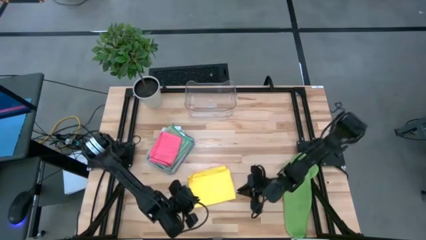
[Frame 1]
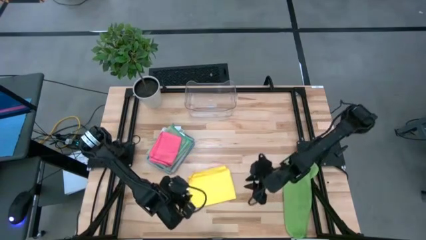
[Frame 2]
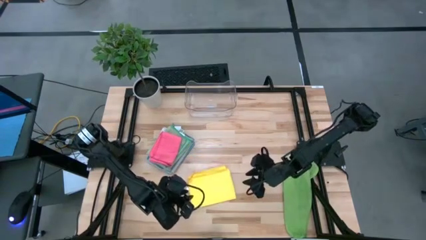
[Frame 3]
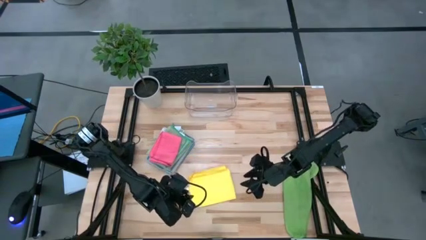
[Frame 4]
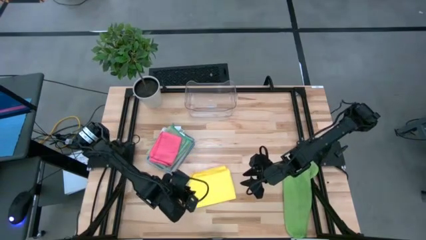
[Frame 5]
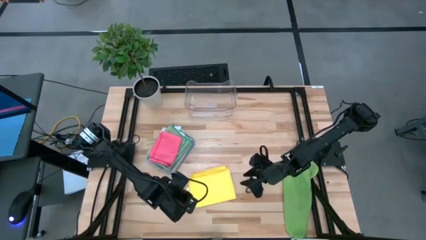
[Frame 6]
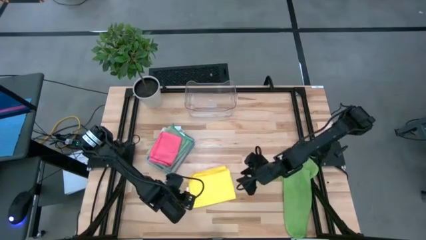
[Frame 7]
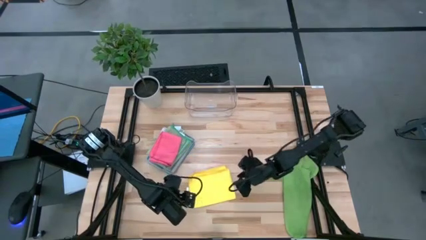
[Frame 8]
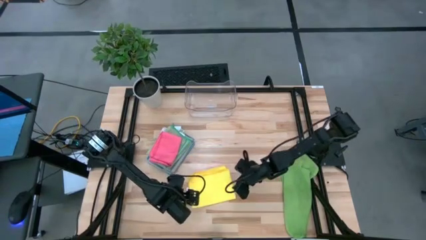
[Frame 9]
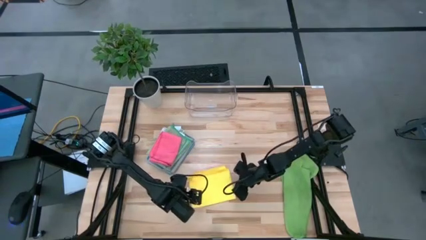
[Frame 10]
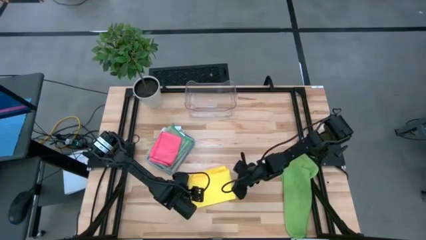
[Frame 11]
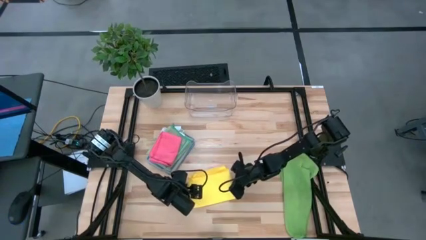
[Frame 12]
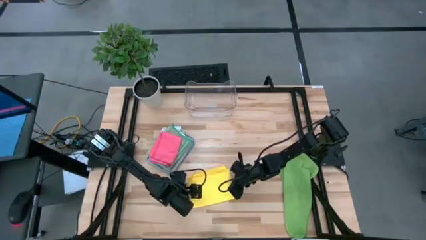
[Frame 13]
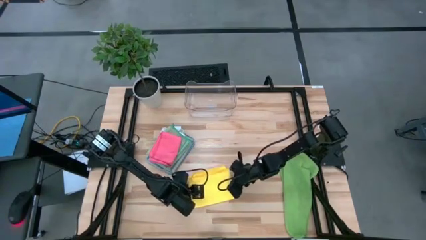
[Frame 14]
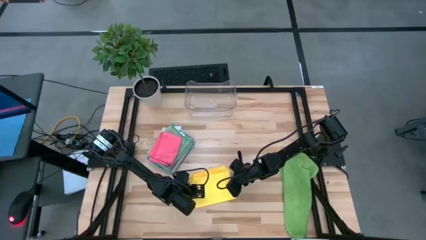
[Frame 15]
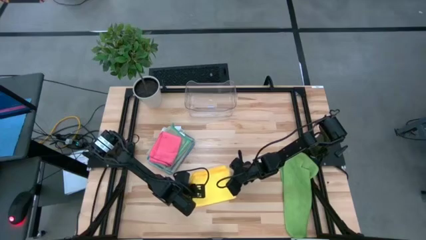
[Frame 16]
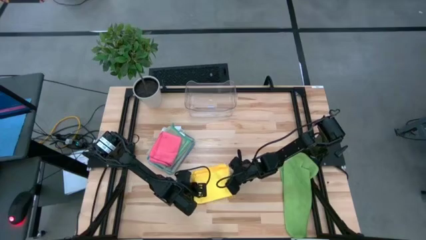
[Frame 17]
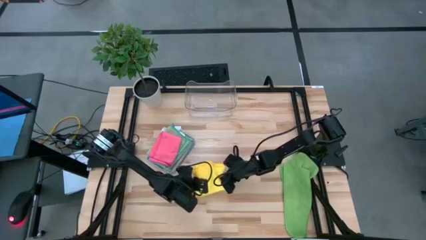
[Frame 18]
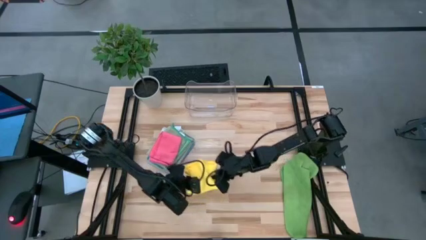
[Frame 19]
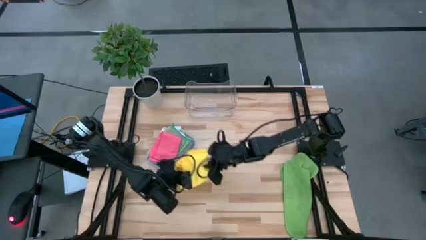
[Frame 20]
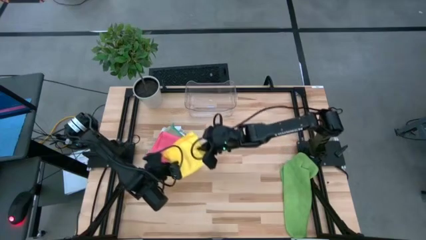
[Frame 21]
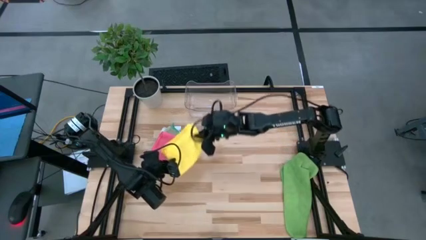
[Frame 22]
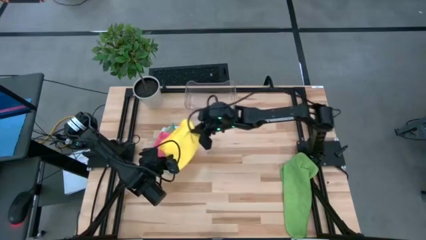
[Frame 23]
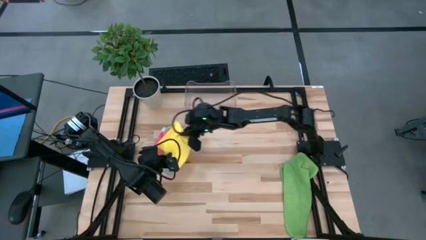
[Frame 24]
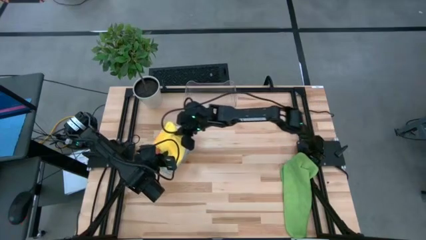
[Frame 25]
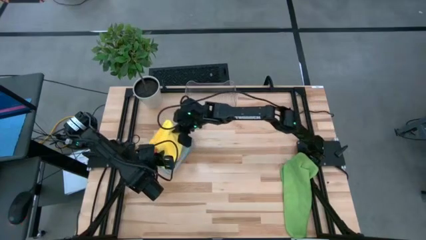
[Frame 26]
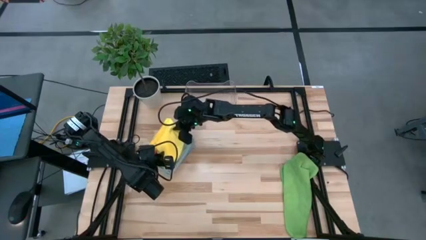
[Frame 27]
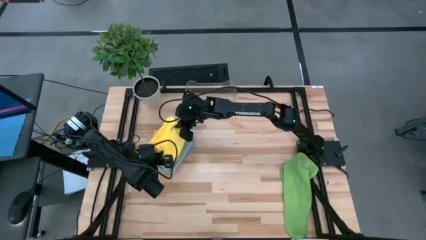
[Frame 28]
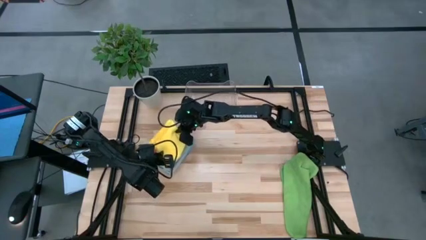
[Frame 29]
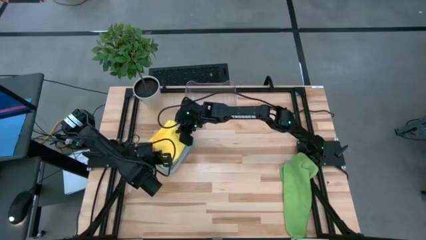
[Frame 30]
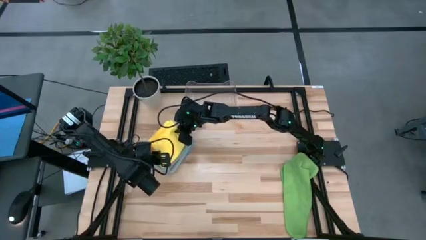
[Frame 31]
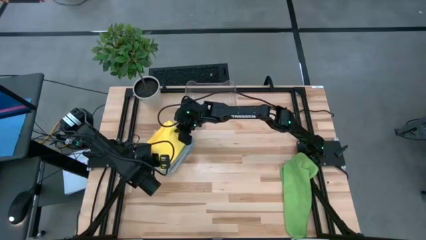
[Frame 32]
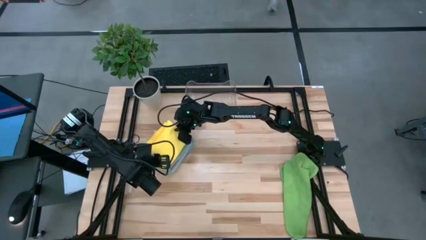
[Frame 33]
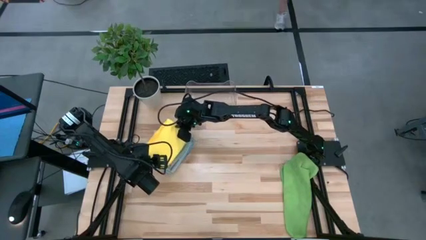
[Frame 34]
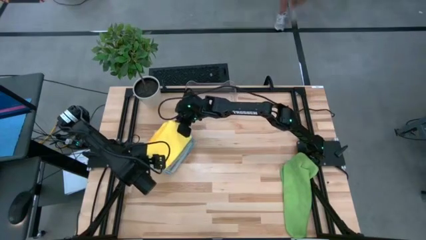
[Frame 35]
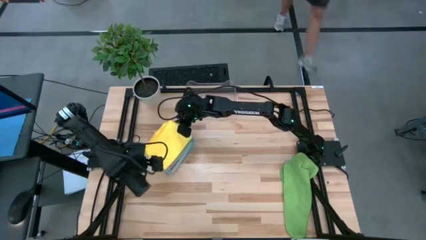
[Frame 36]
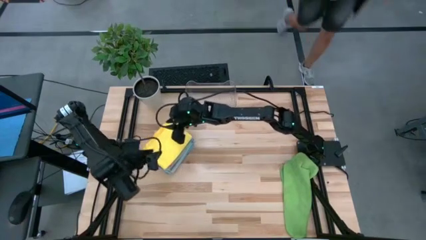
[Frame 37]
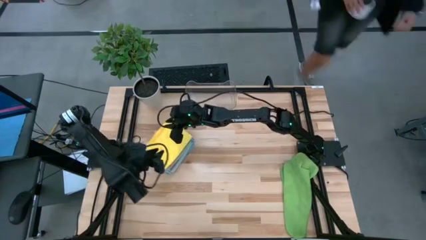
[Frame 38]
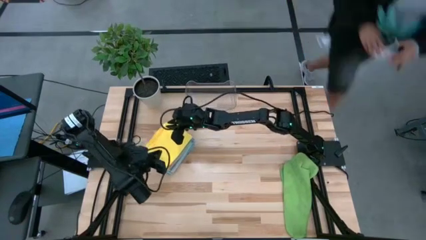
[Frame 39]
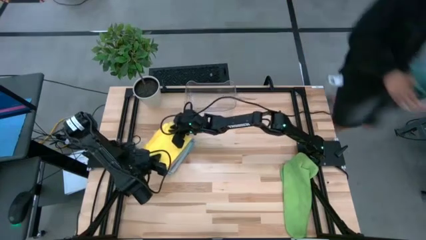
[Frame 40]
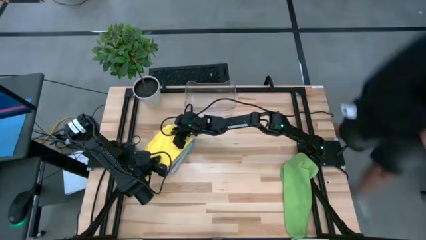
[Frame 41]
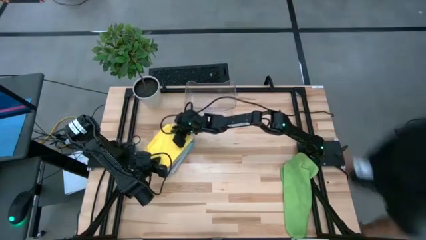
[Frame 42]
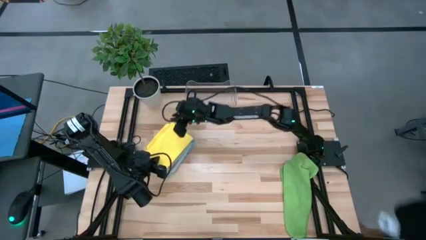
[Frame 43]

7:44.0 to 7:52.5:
Task: Fold microfiber towels
Stack the folded yellow microfiber cloth on top of the folded pink microfiber cloth

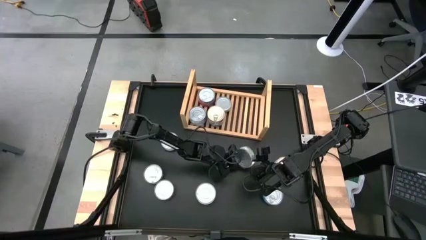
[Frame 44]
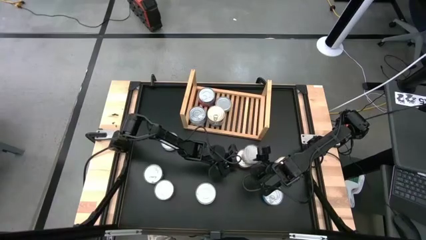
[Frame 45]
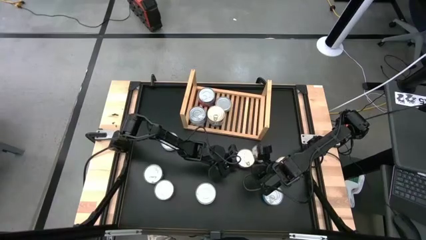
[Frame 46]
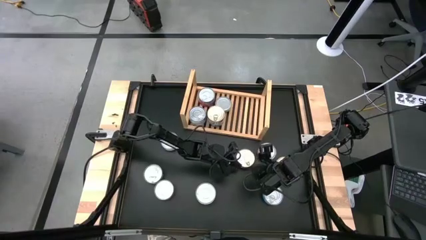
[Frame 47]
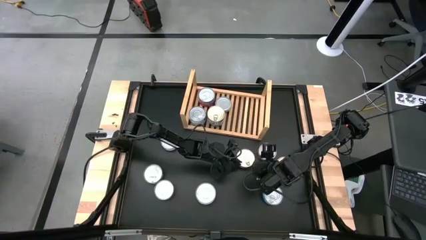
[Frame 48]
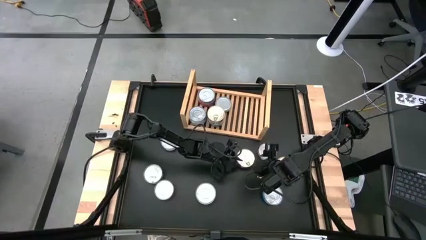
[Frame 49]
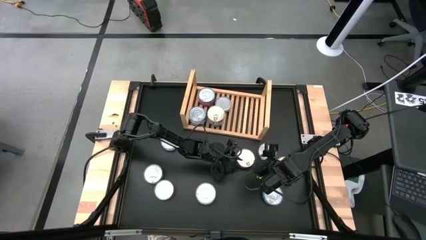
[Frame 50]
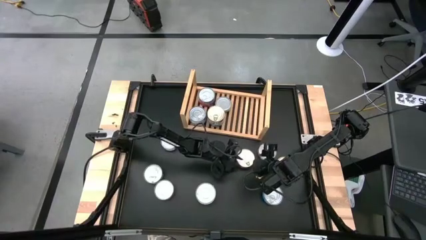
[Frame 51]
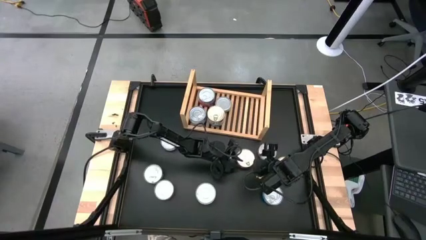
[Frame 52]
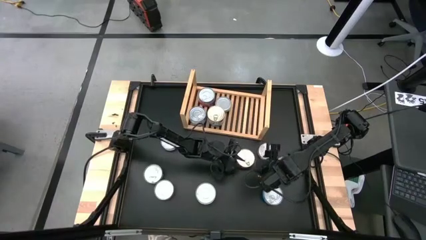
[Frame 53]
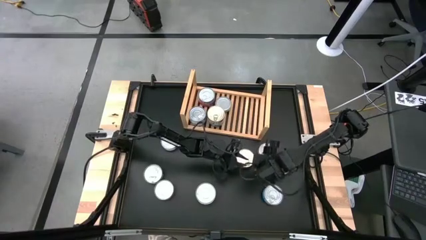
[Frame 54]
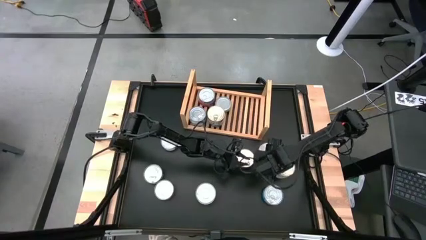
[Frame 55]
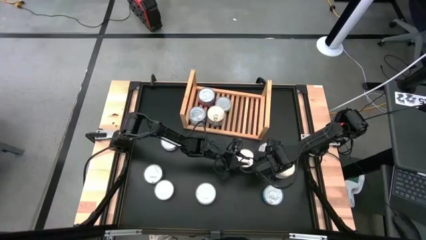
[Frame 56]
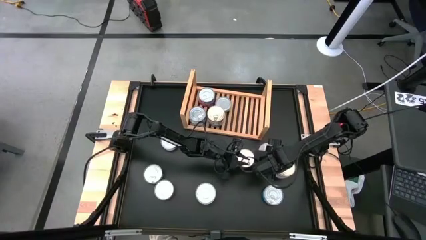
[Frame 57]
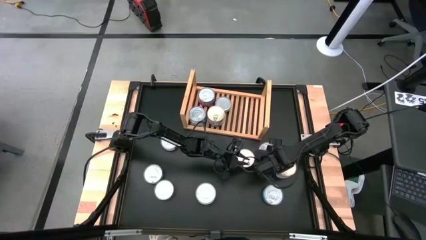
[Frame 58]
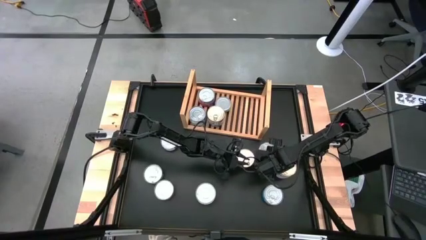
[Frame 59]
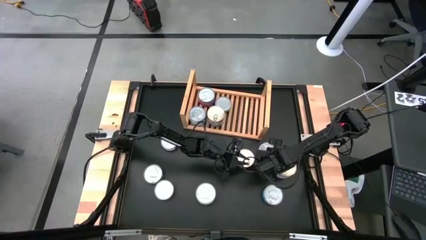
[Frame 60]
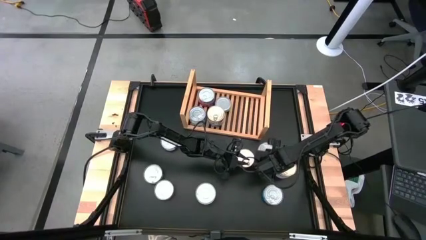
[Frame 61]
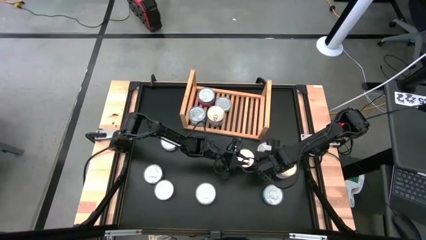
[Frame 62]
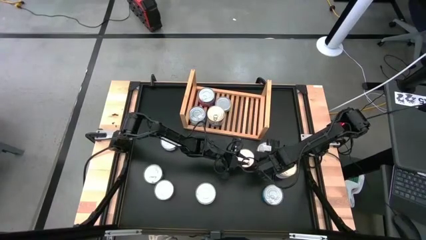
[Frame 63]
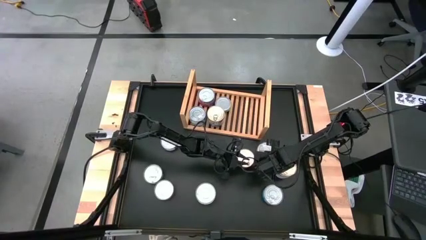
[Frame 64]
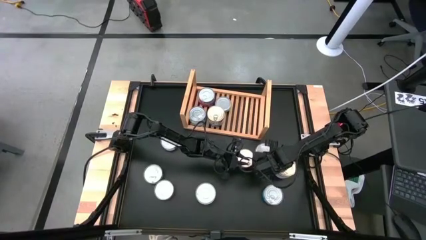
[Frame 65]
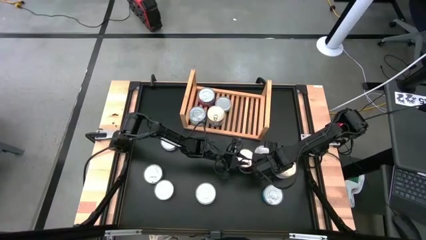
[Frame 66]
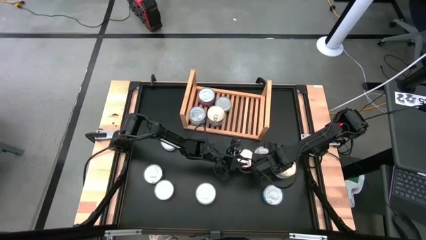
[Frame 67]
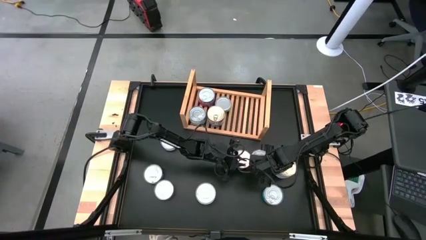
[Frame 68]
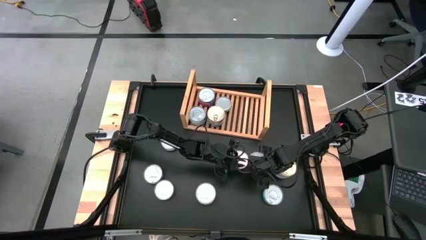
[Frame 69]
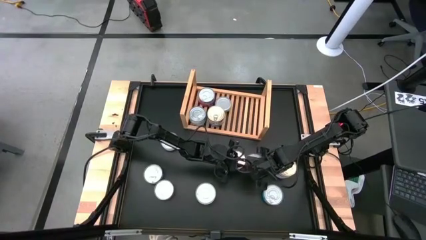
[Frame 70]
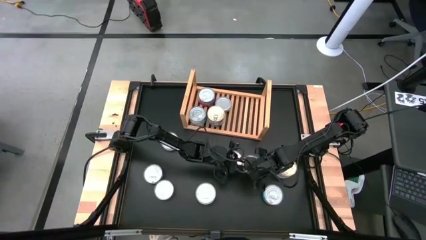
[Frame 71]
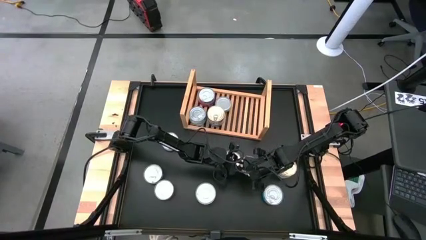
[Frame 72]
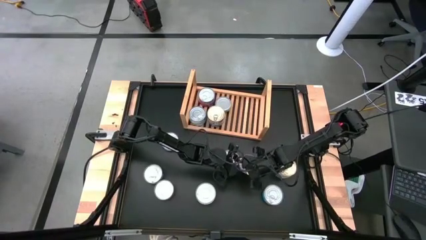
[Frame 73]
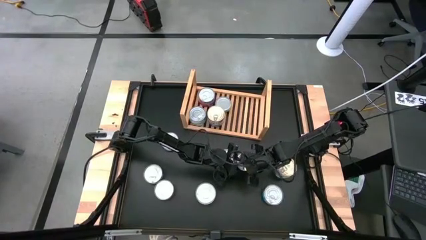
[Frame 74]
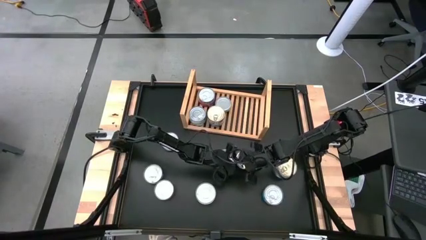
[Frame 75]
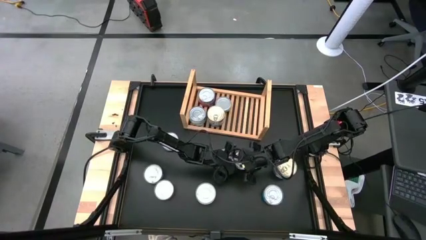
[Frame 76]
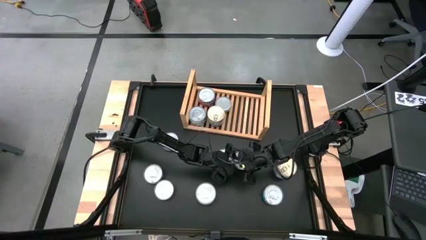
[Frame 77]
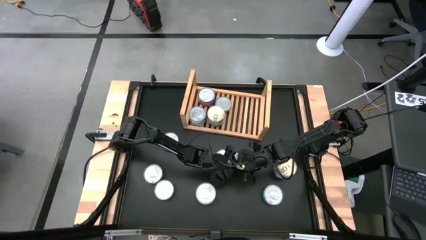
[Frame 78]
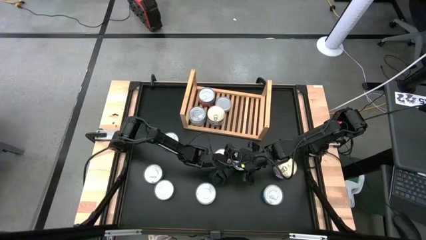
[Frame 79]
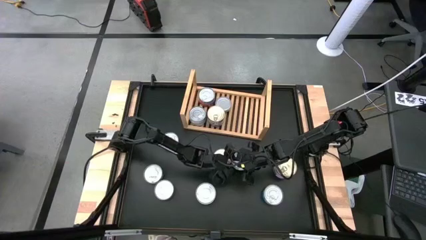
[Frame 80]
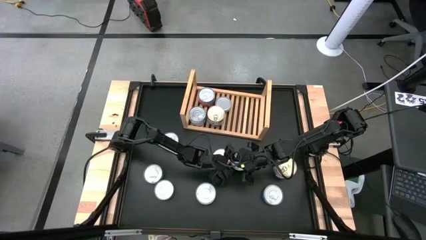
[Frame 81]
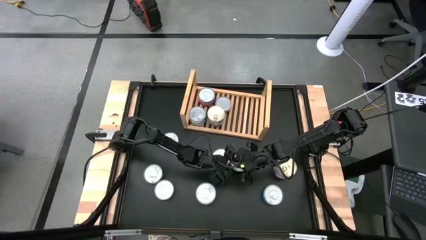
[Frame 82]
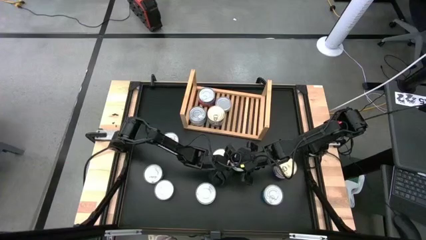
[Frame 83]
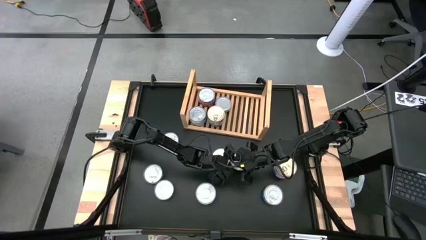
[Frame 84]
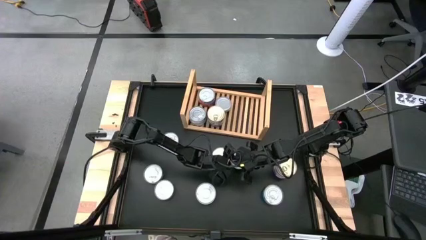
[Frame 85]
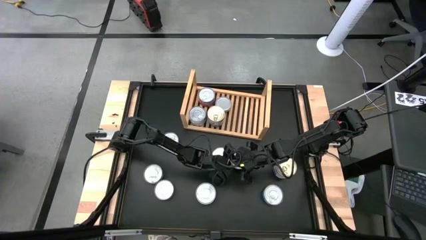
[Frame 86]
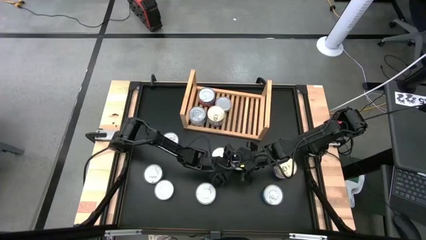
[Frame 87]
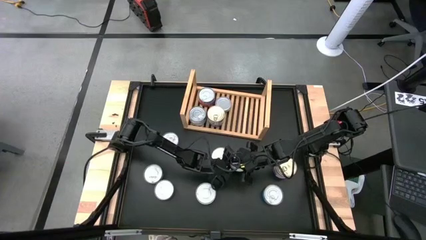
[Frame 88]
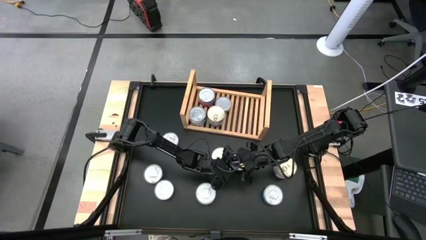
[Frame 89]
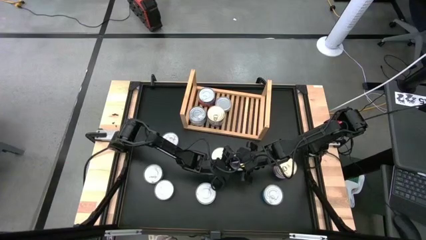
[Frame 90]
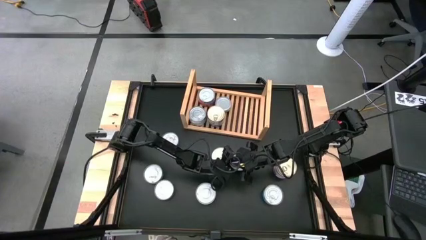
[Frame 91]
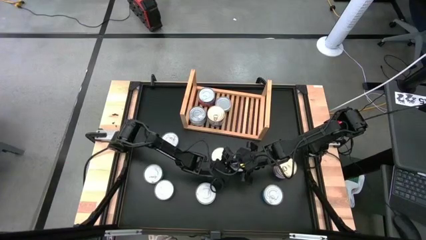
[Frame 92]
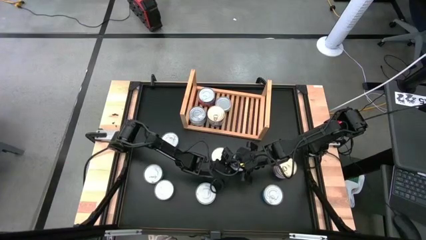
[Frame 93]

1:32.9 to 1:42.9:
Task: Stack canned seafood by type on shelf
Stack the green tuna can on top of the other green tuna can on the shelf
